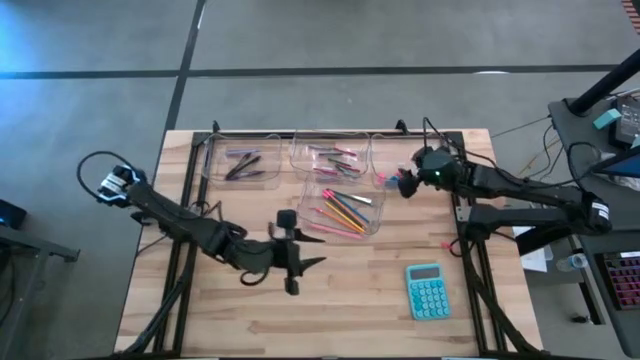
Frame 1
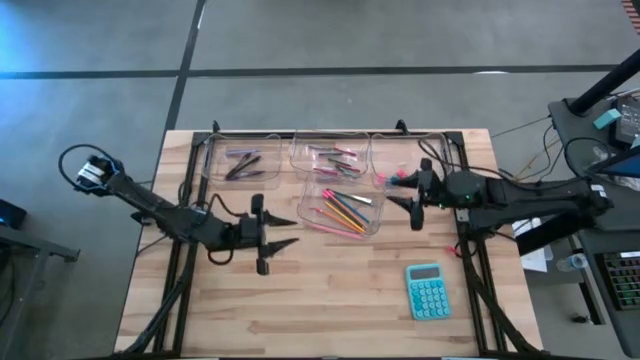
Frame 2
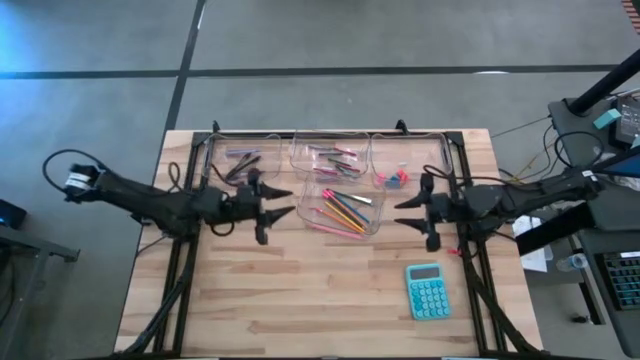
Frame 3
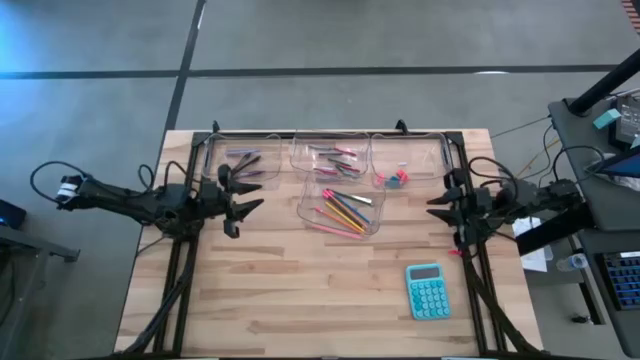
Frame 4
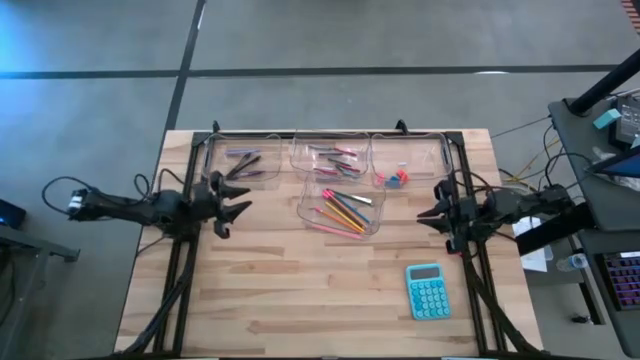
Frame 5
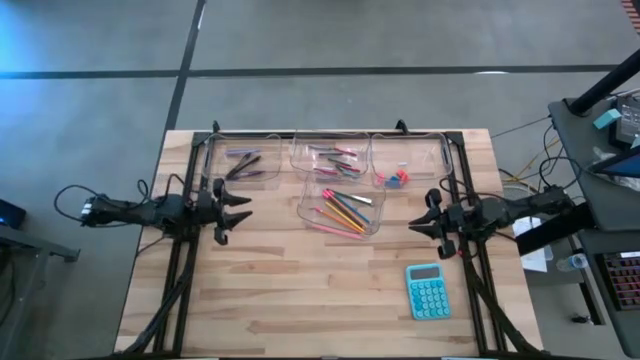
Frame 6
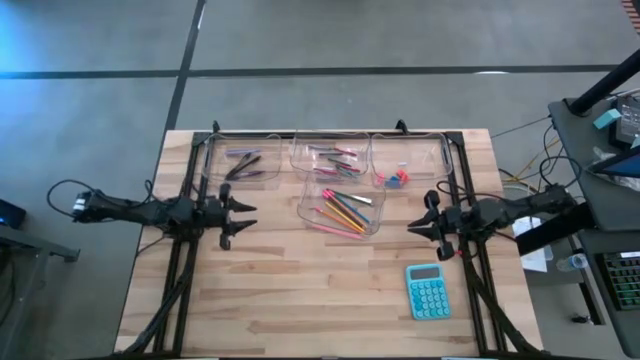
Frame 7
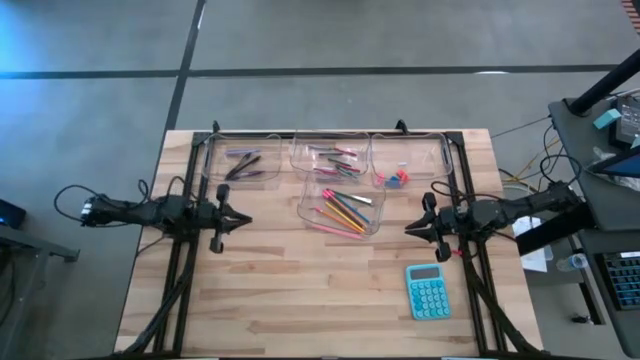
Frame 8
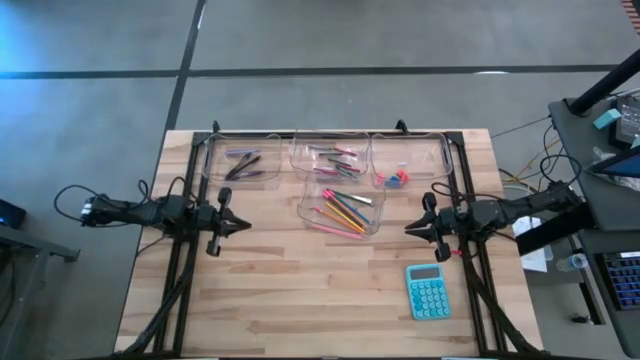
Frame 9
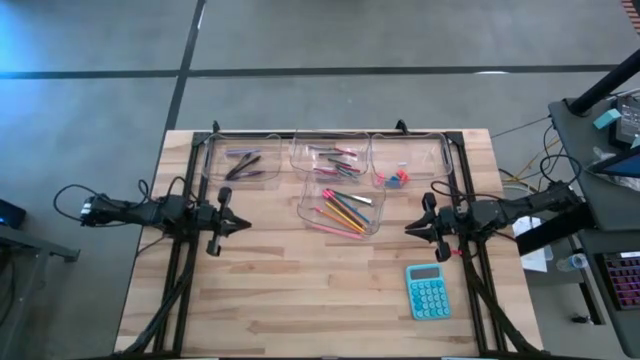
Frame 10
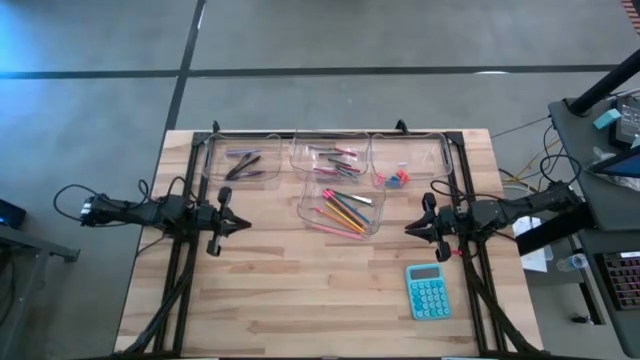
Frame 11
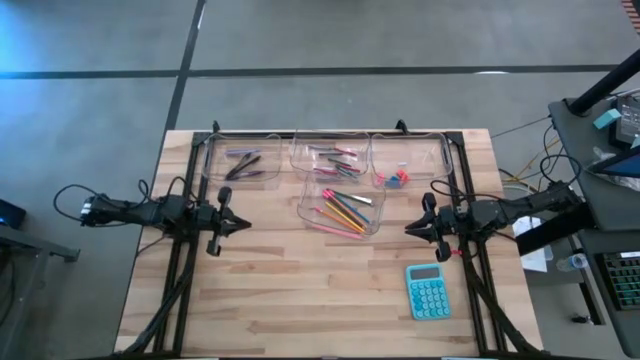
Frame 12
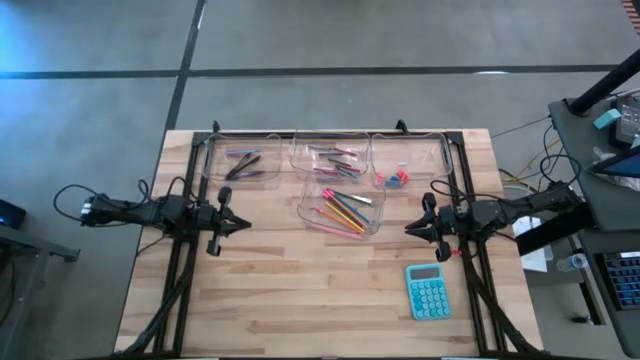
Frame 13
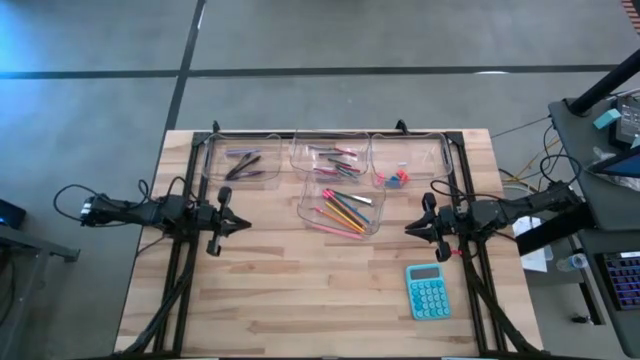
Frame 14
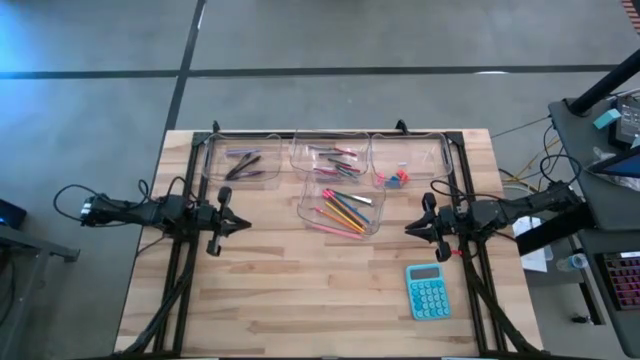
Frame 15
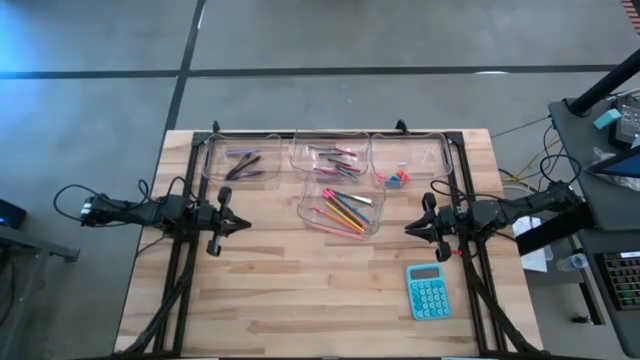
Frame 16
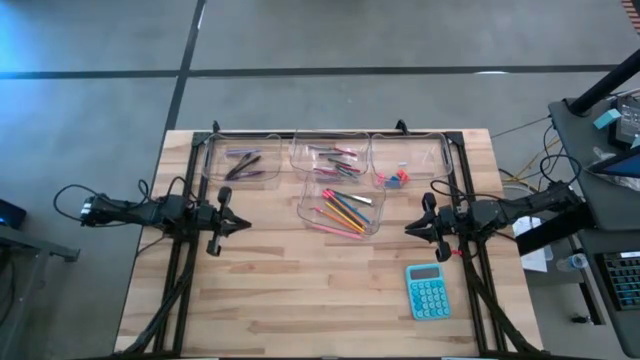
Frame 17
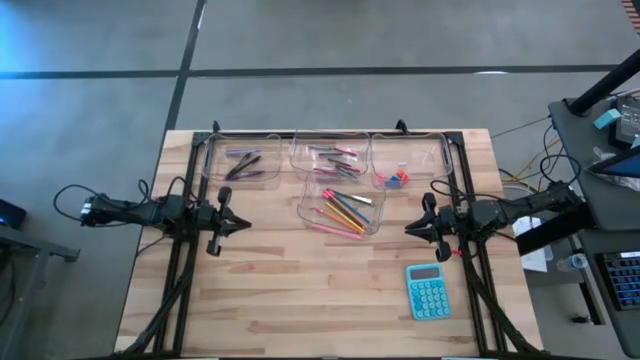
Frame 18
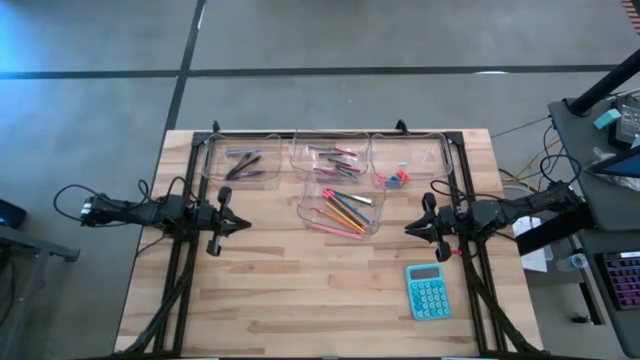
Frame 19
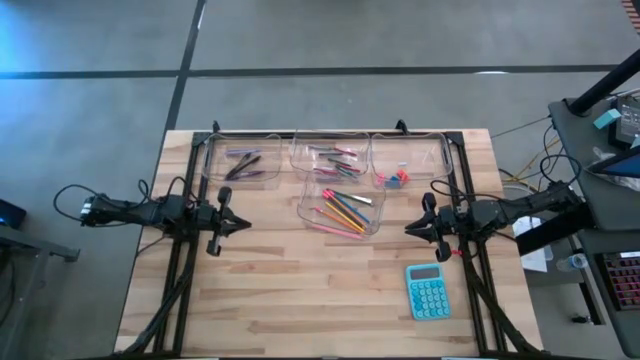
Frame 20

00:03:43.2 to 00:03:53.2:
Task: Sort crayons/erasers/pens/pencils in bins
Return to Home Position

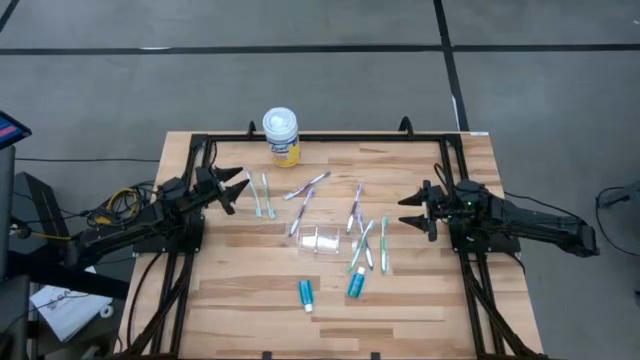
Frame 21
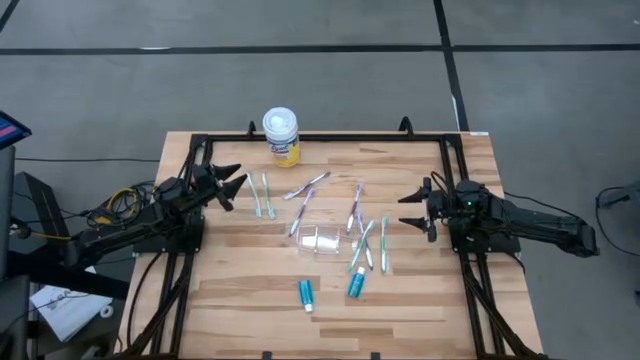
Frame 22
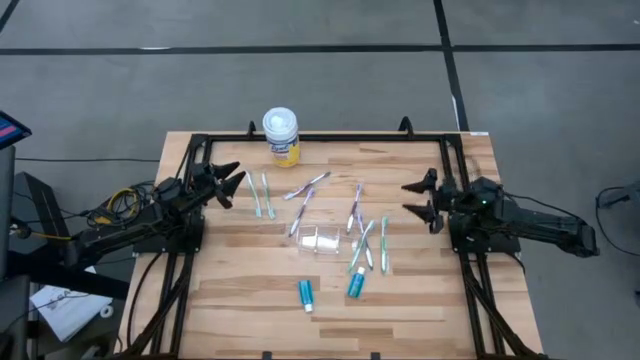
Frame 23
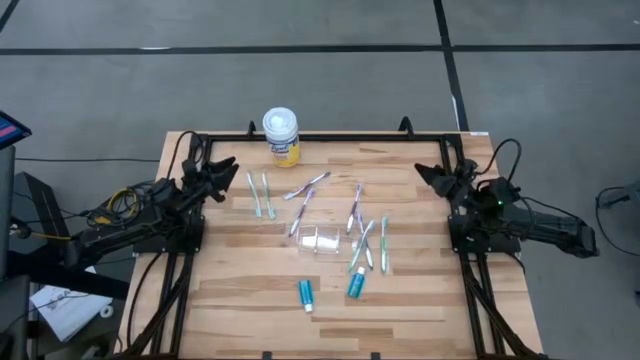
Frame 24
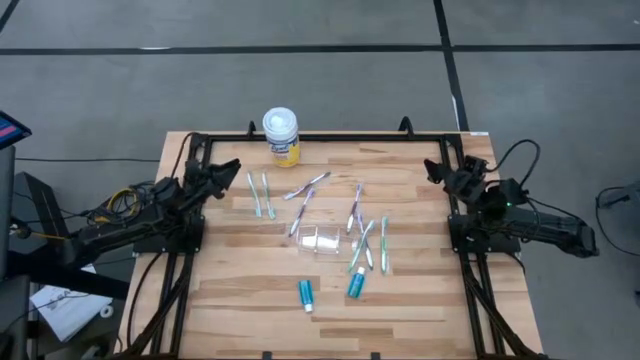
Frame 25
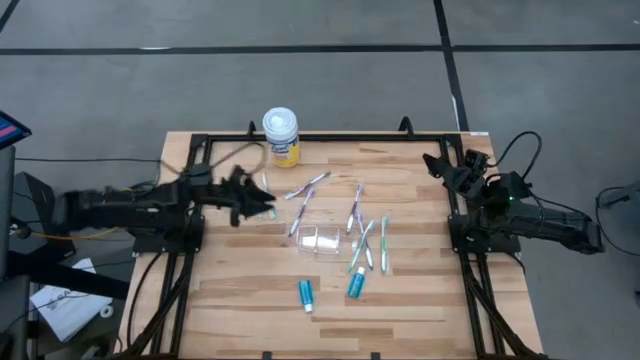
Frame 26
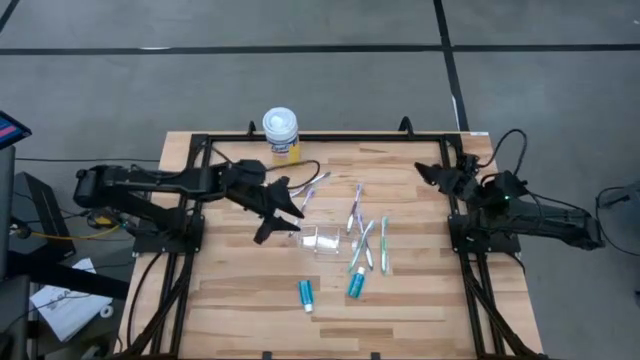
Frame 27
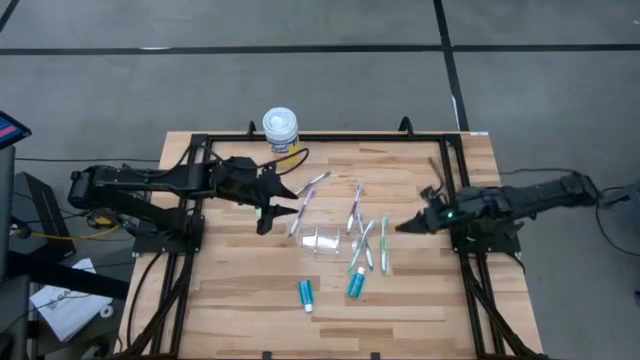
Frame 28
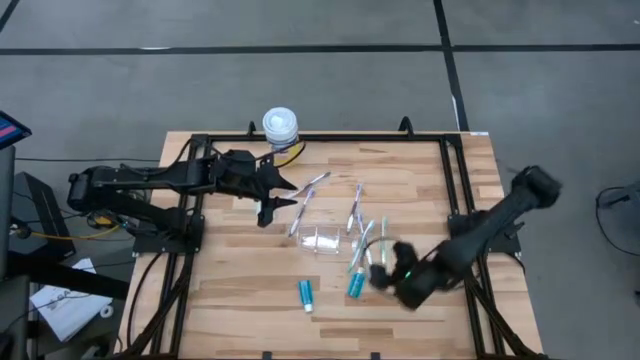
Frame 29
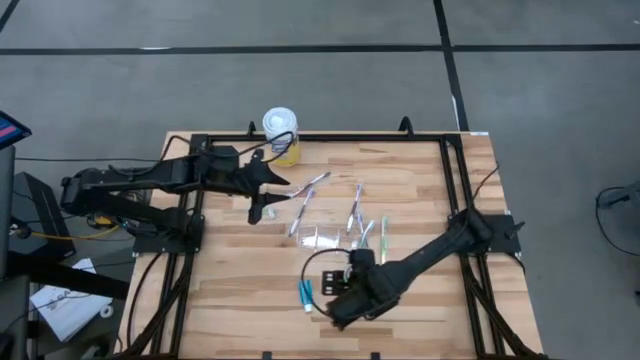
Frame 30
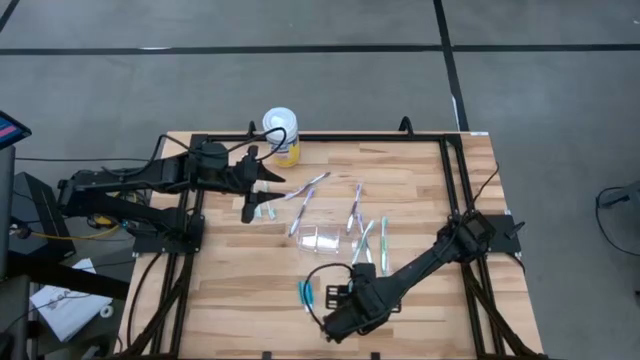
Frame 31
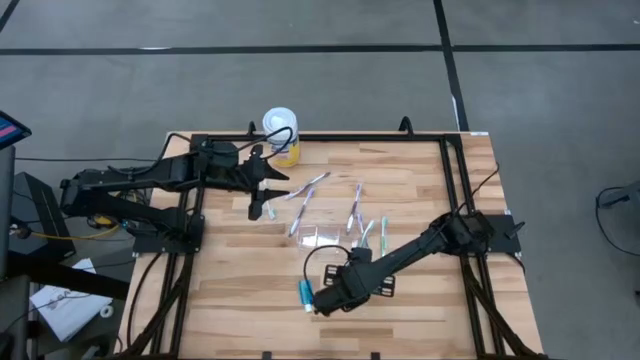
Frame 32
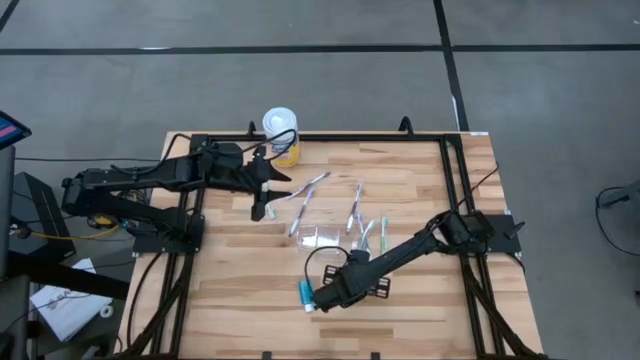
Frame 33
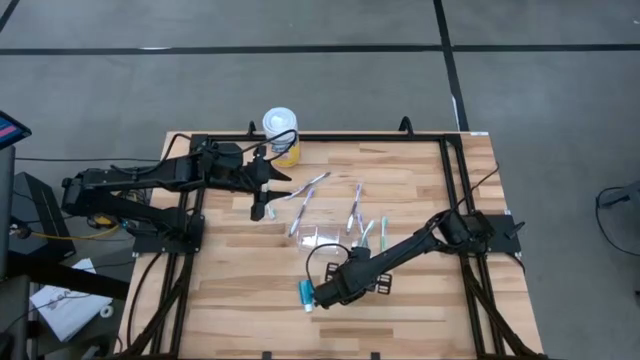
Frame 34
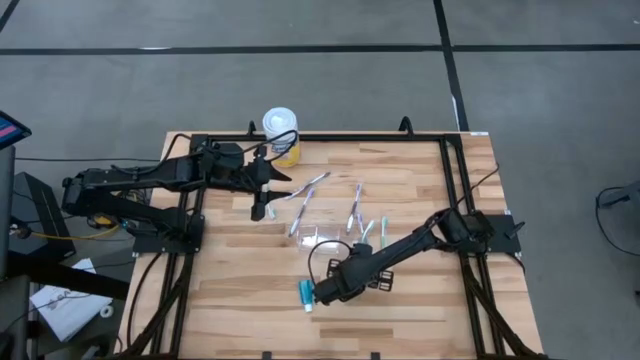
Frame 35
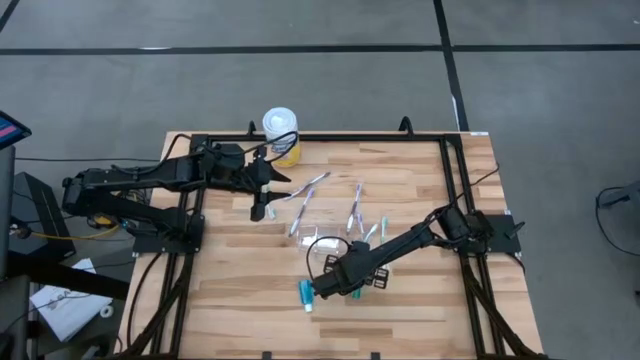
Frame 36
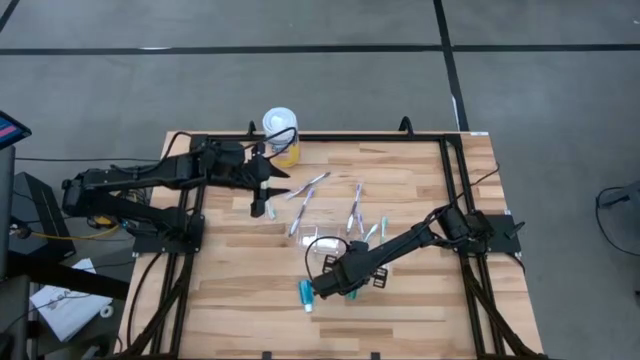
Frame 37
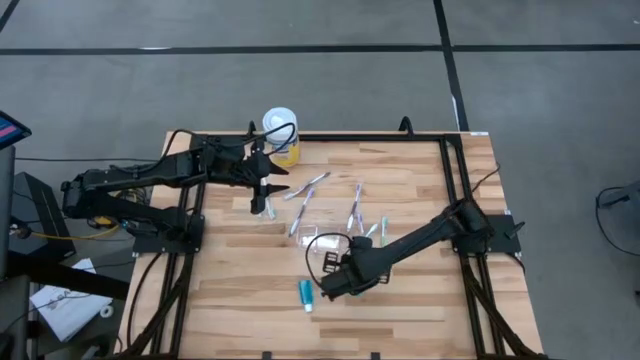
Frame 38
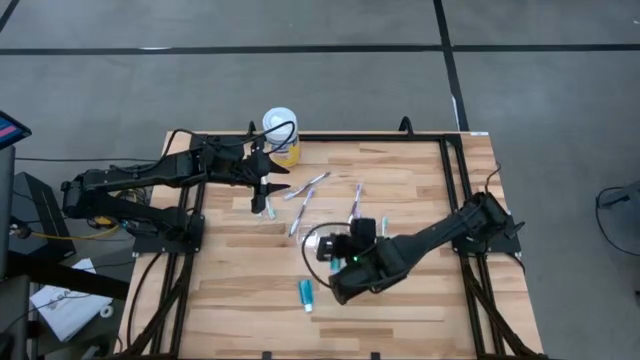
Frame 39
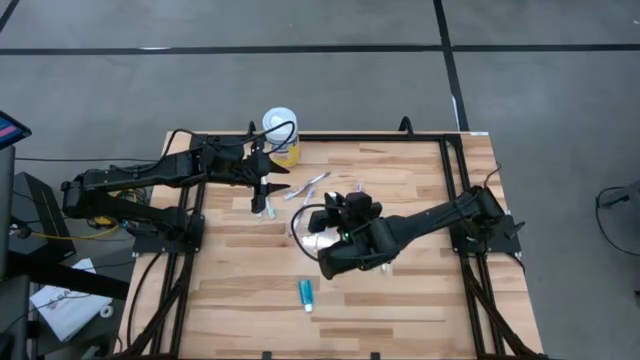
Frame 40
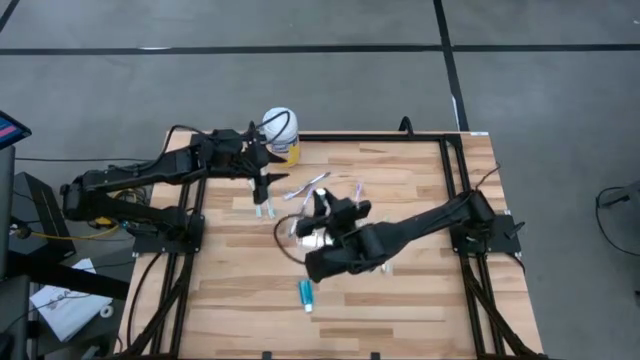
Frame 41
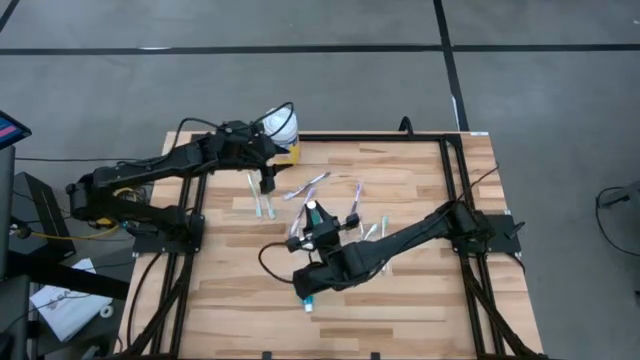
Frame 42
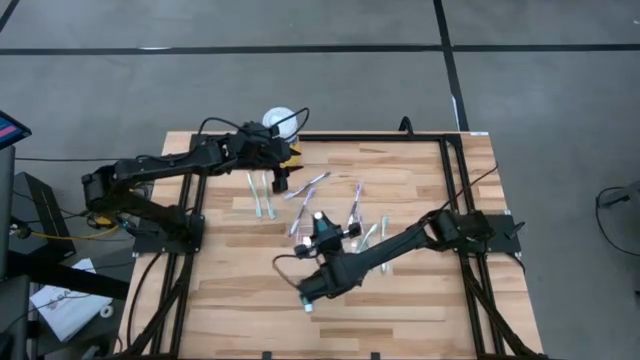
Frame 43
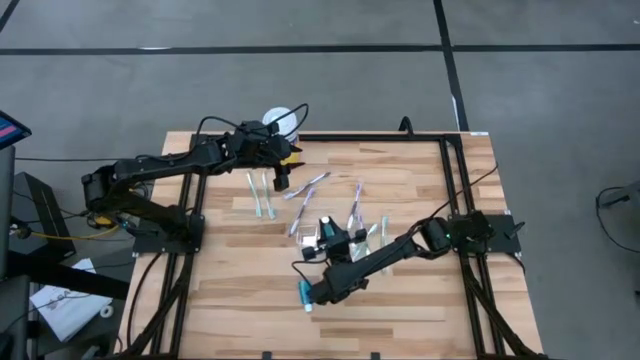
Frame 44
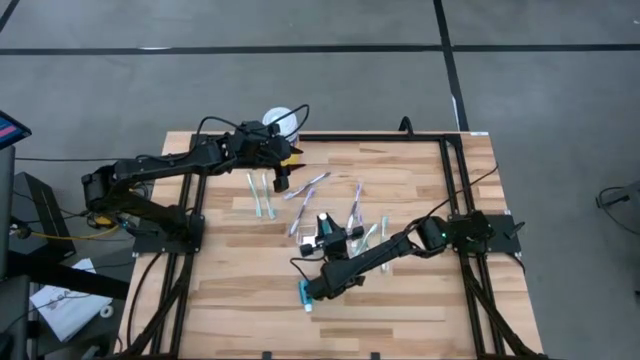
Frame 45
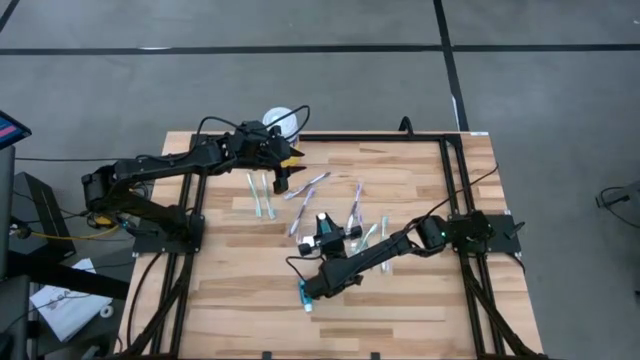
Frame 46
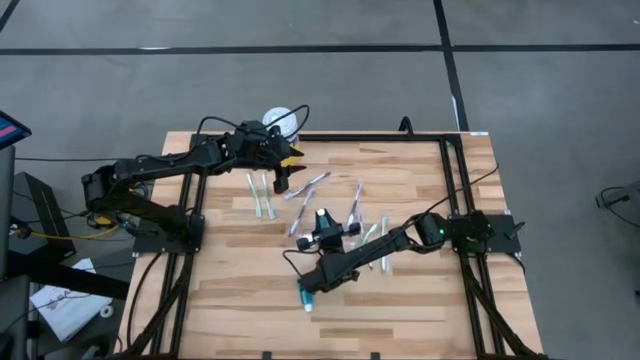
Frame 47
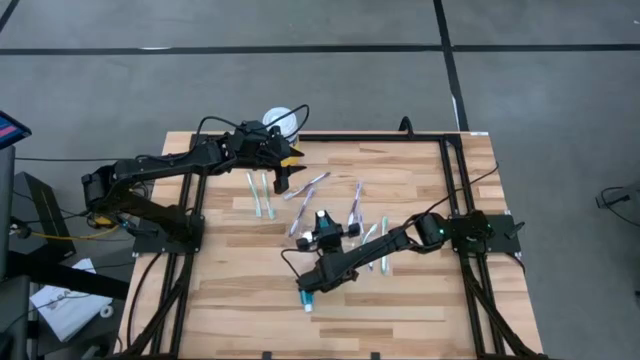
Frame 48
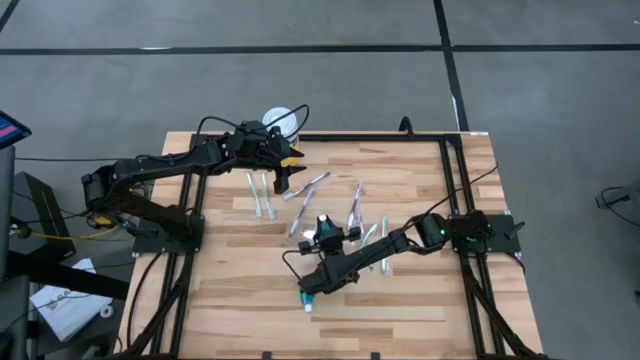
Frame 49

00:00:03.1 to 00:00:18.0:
Task: Pick & Place toothbrushing station
Put the mouthwash into the middle compartment of the transparent organizer
